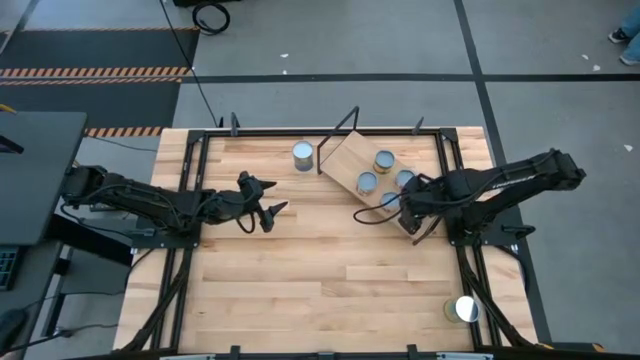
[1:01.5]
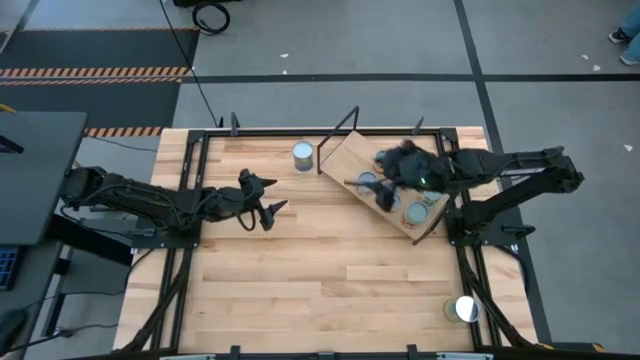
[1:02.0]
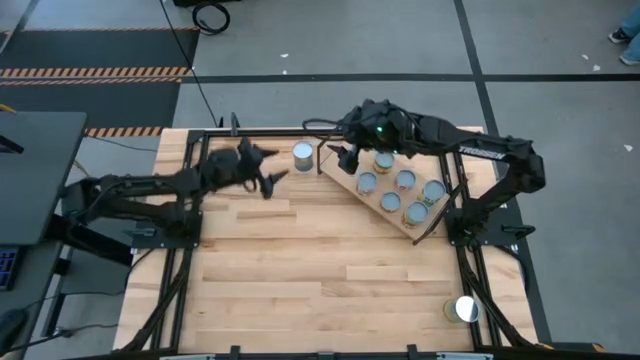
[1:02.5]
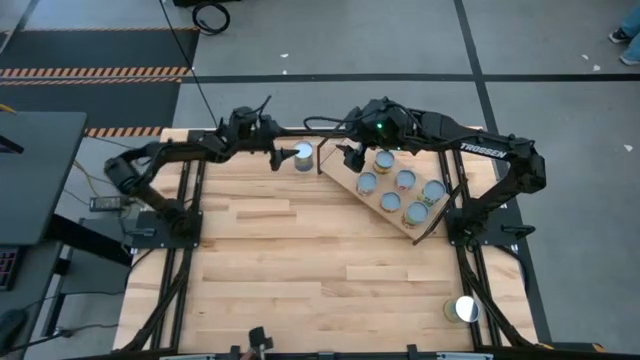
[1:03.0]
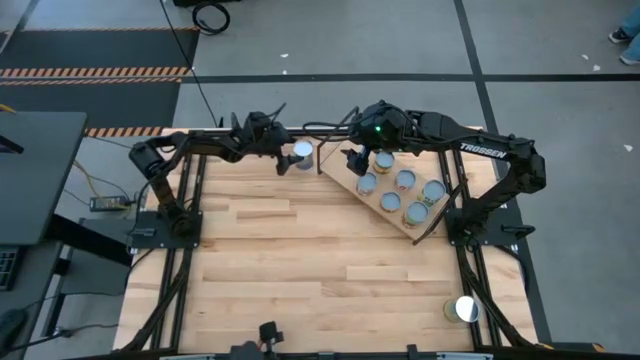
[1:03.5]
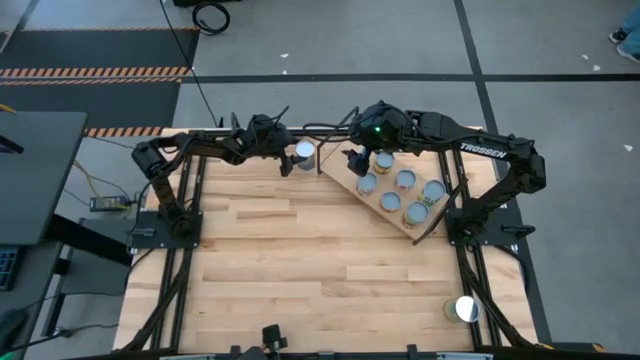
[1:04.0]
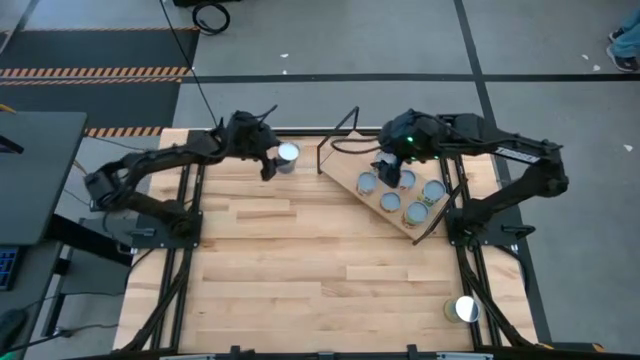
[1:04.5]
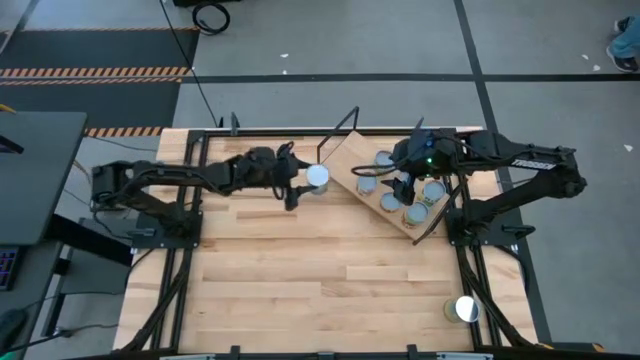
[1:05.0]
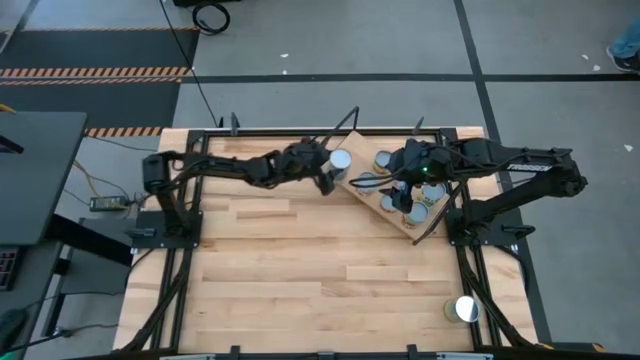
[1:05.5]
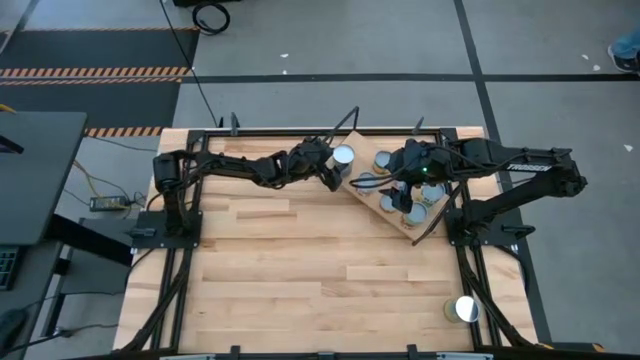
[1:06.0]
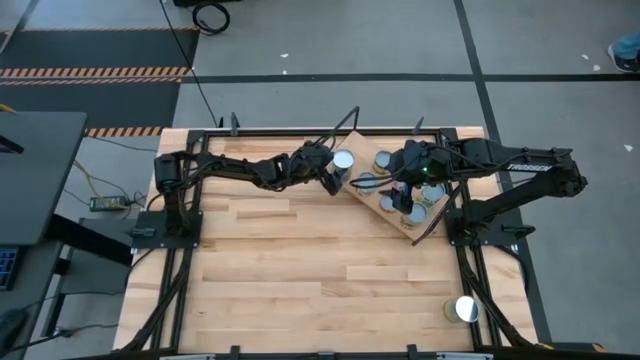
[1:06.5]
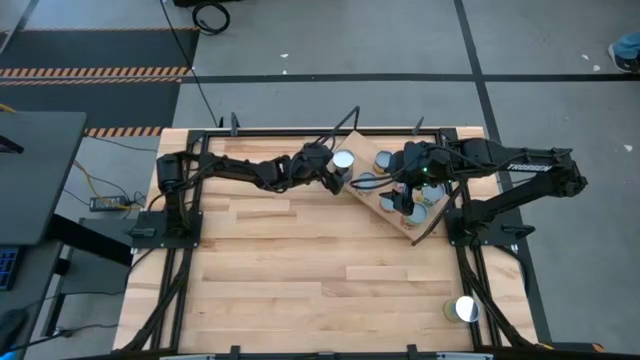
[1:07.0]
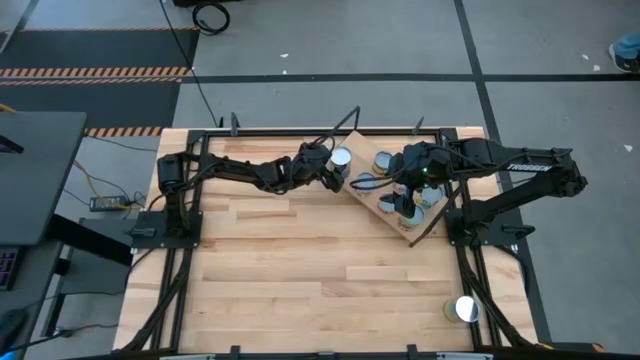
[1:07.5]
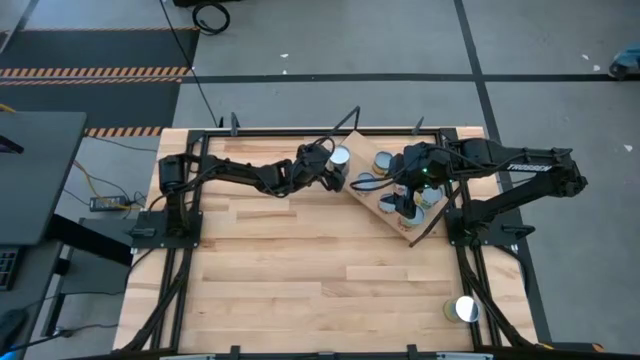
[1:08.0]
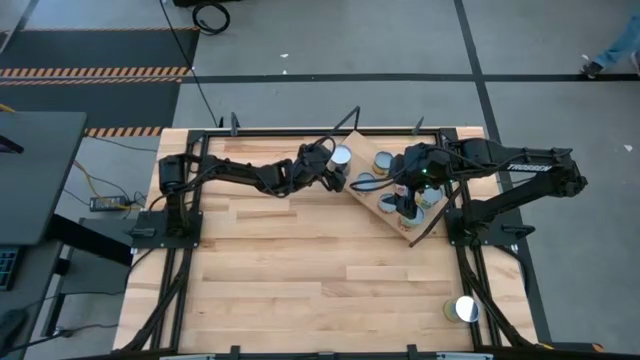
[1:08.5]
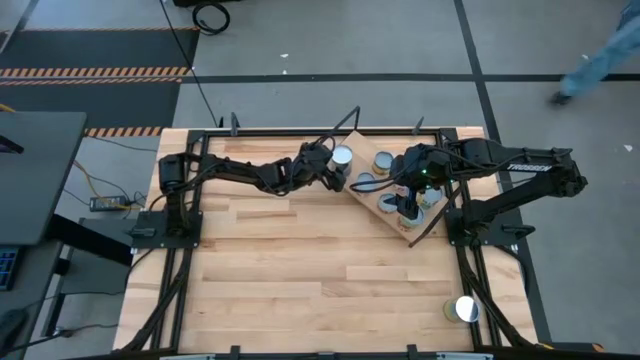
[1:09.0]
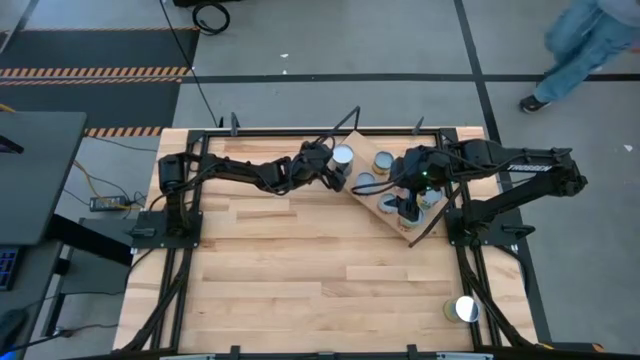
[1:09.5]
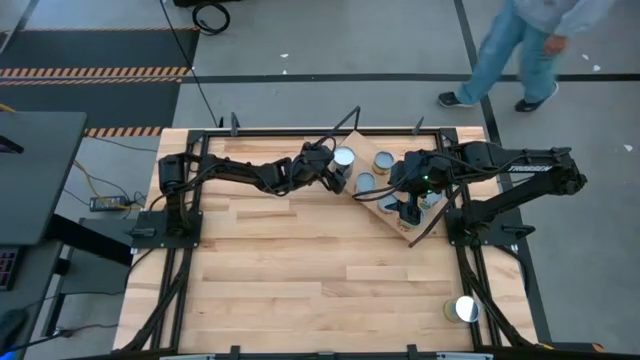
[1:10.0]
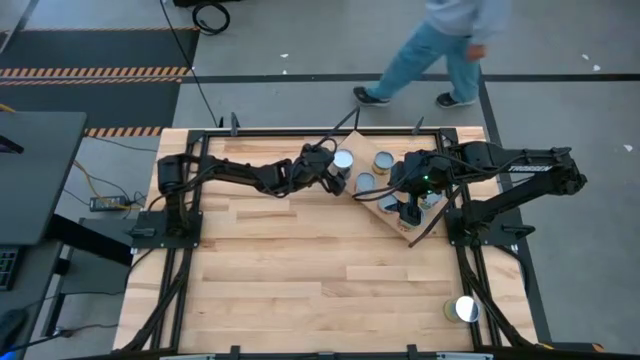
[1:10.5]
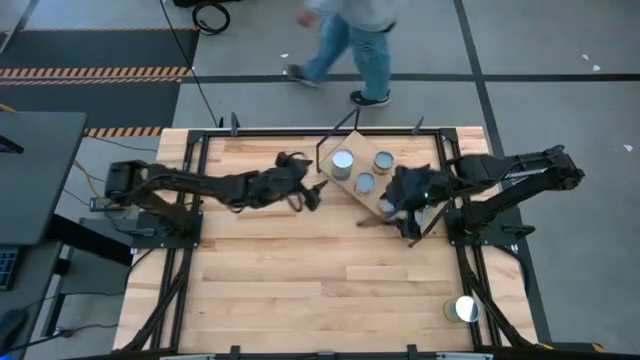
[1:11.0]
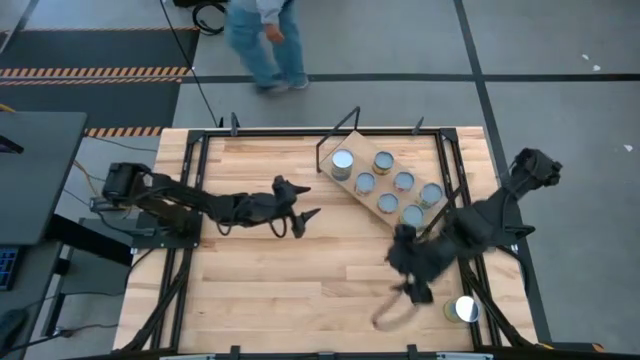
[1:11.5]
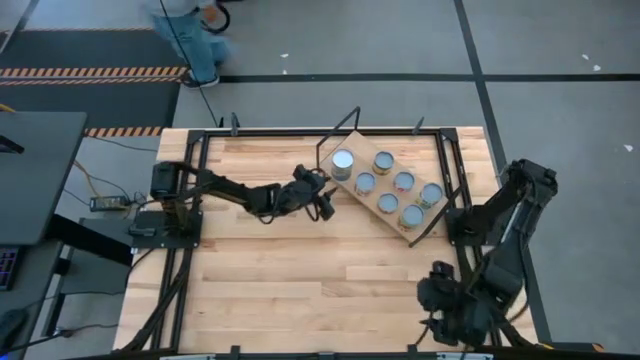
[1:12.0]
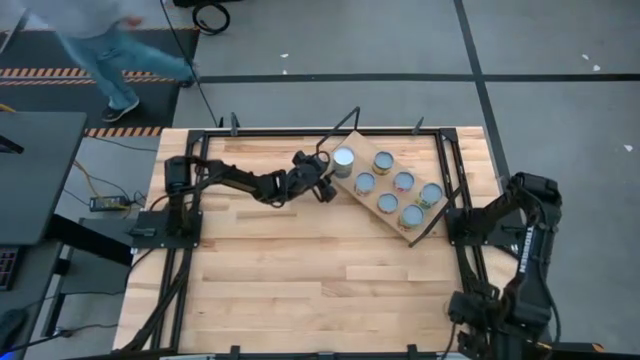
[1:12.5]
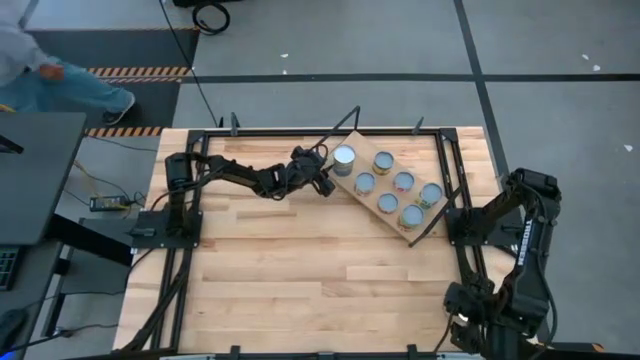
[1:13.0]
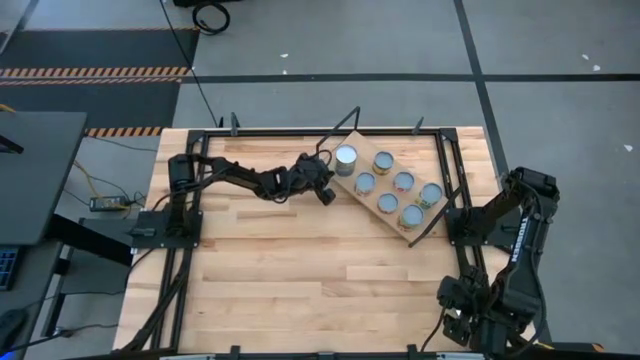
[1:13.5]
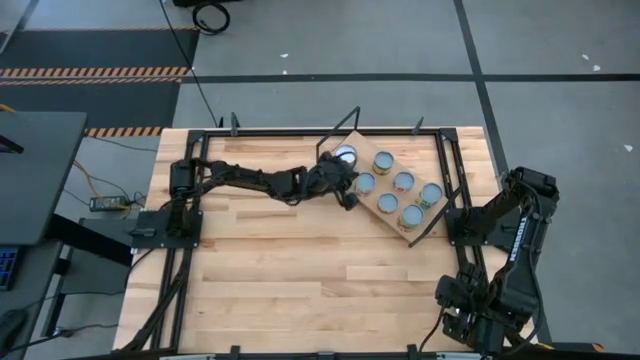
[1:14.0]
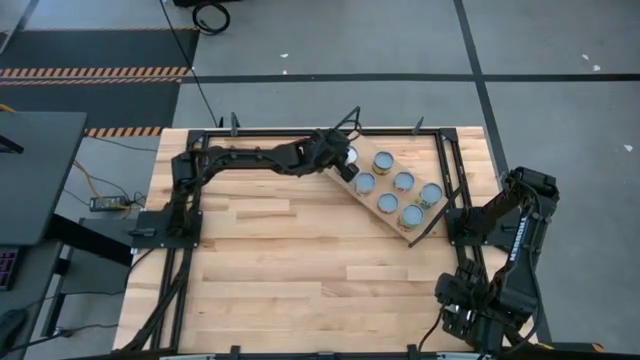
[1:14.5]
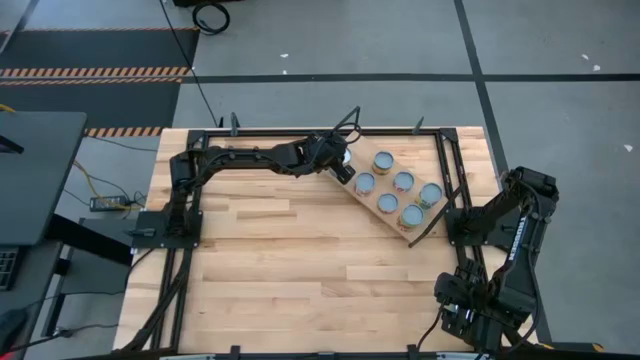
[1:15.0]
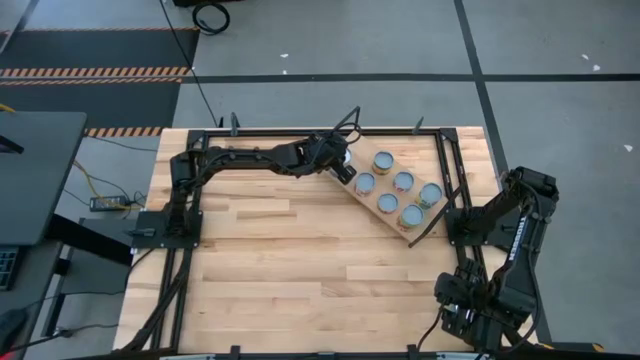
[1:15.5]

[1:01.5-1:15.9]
Task: Pick and place cans onto a shelf
Put the canned peas on the shelf

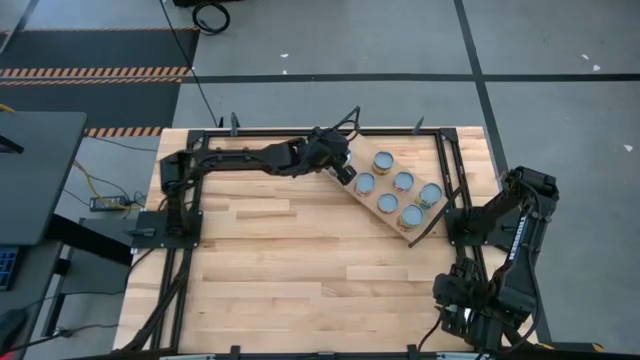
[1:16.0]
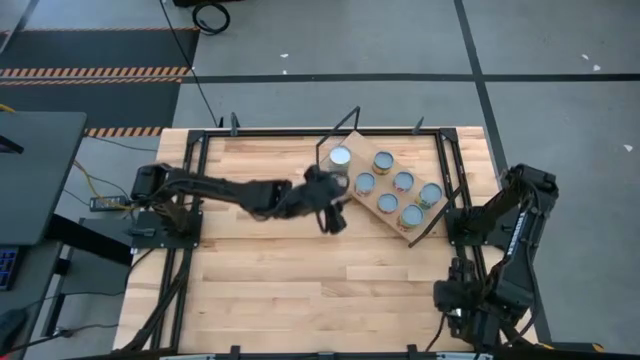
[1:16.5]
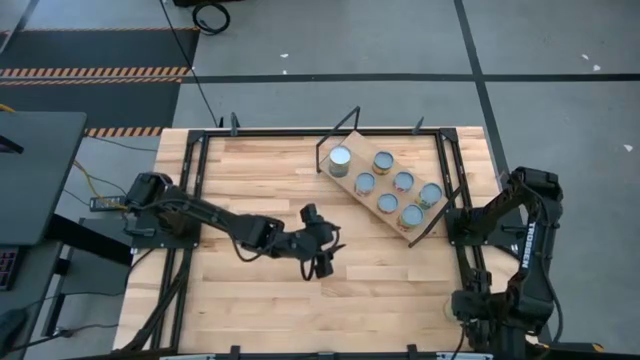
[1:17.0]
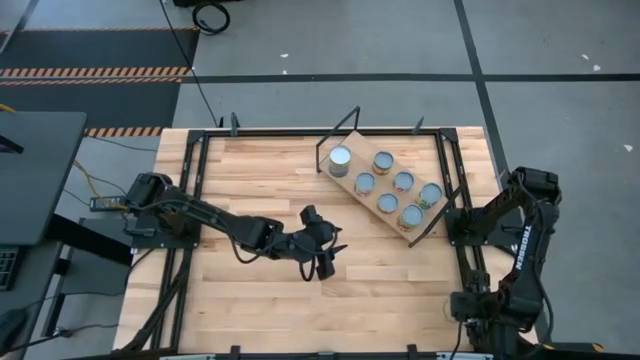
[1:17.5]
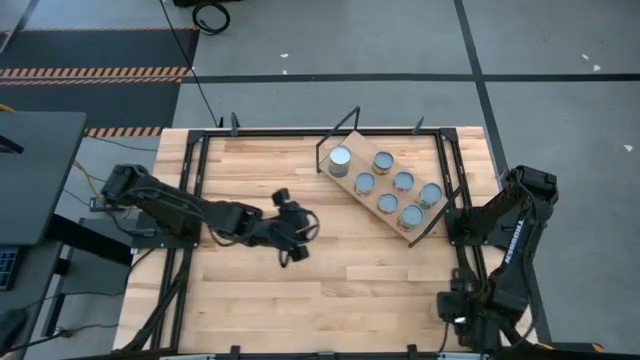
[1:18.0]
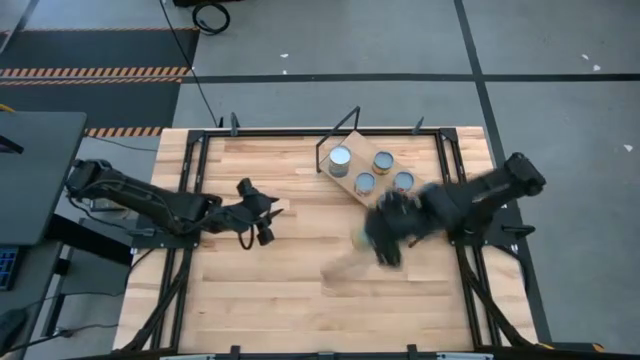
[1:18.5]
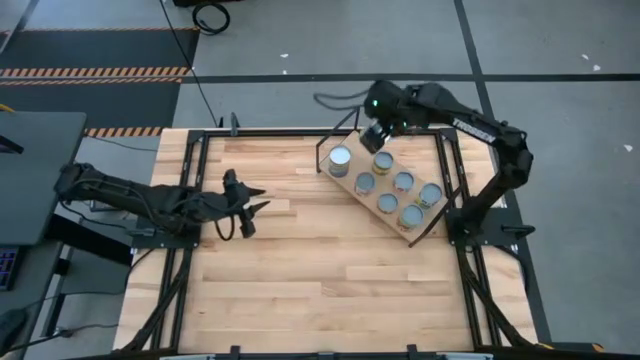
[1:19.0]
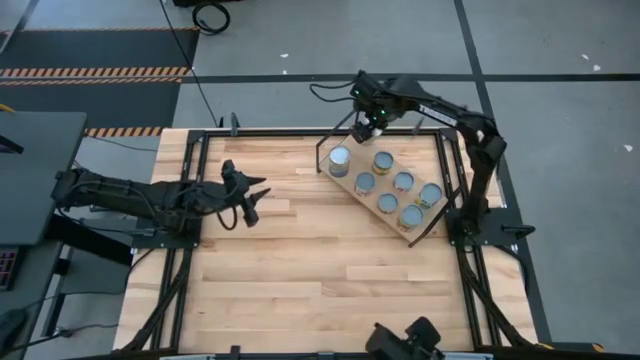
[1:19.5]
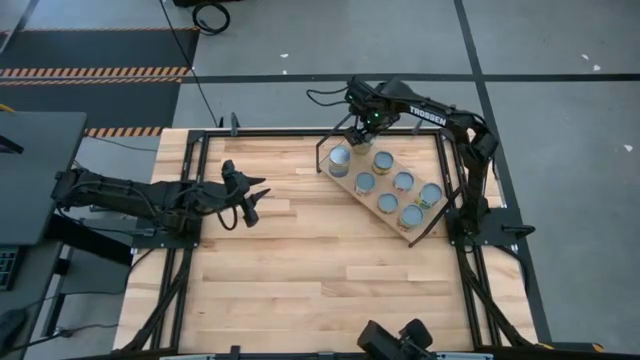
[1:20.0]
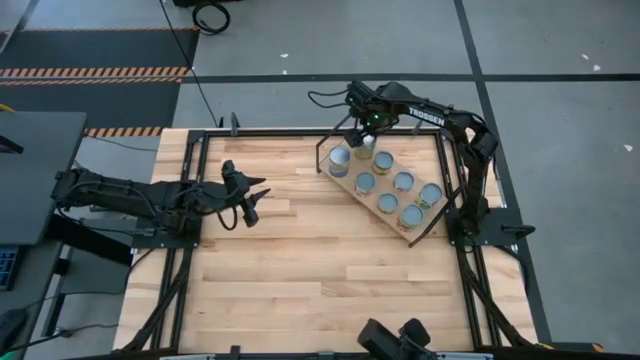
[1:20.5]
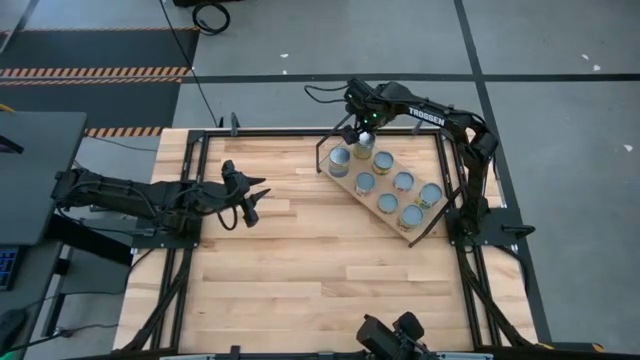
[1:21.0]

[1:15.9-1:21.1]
Put the canned carrots on the shelf aligned with the canned peas

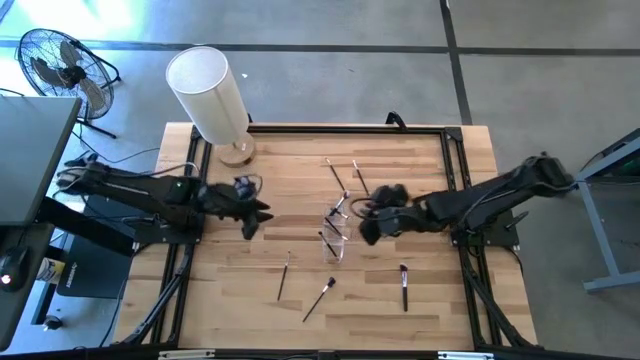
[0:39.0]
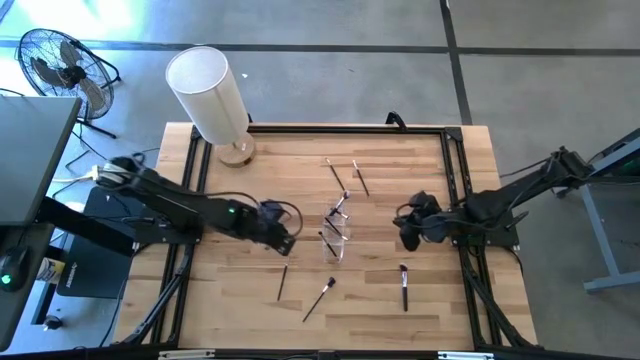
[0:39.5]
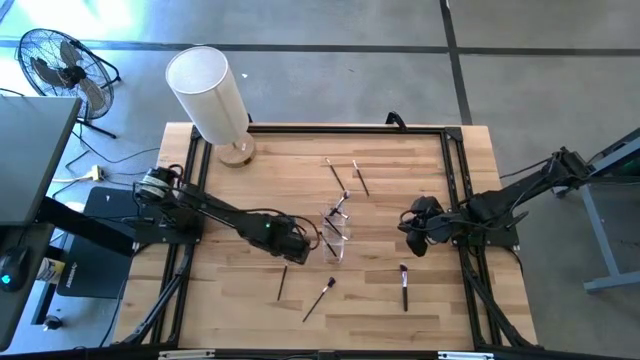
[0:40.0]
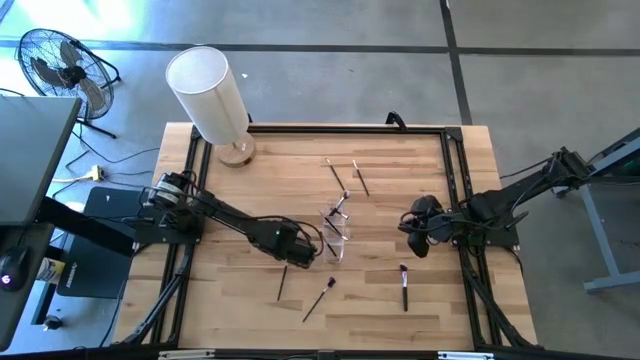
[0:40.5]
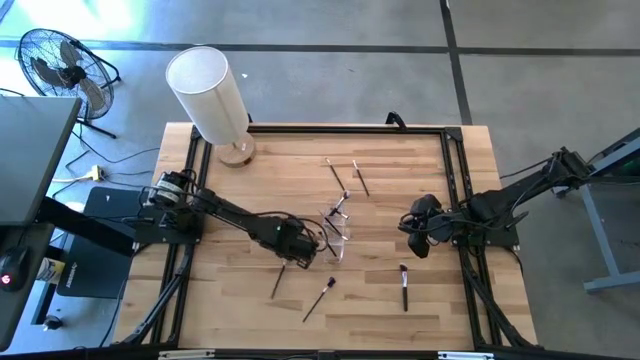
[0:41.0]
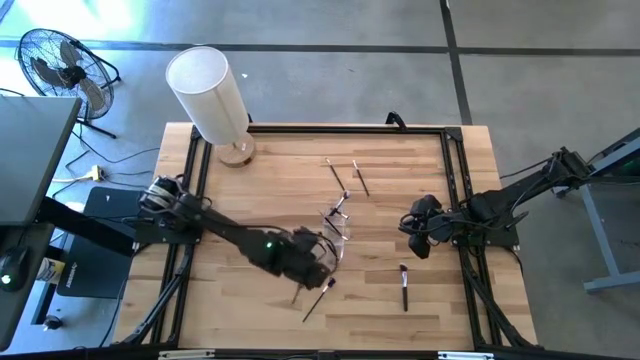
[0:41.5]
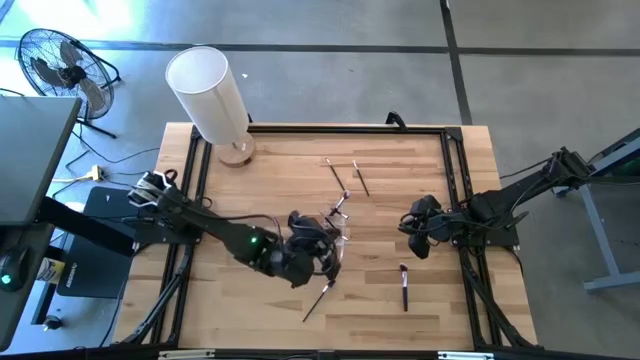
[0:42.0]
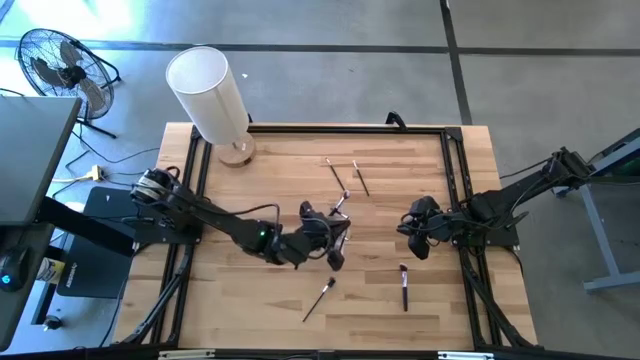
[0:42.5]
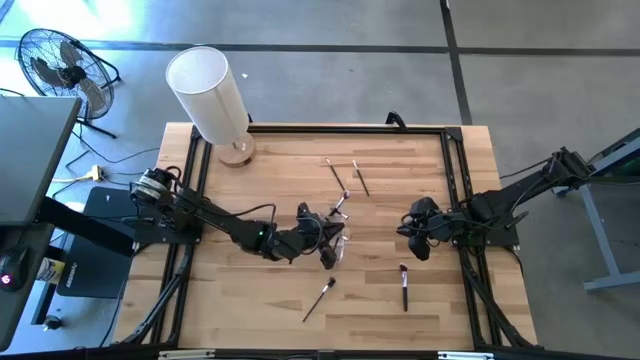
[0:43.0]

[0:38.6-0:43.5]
Task: Pick & Place Makeup Brushes
Put the eyeshadow brush into the transparent organizer
